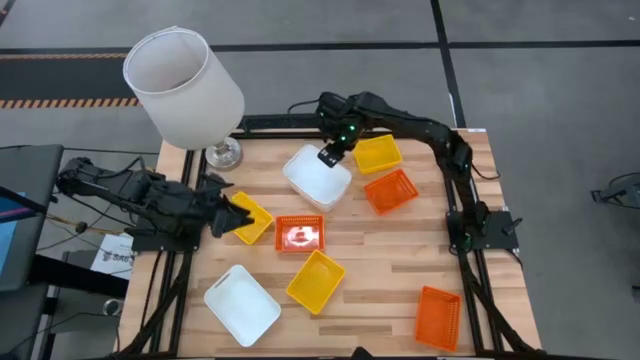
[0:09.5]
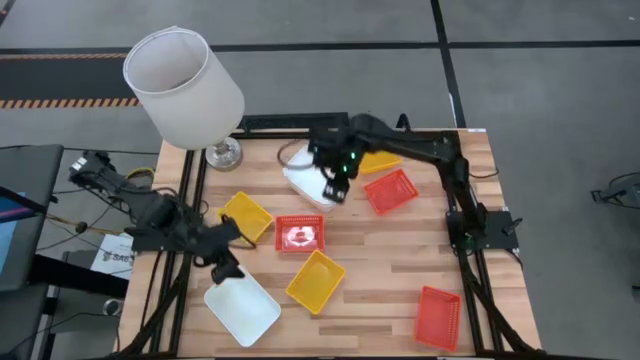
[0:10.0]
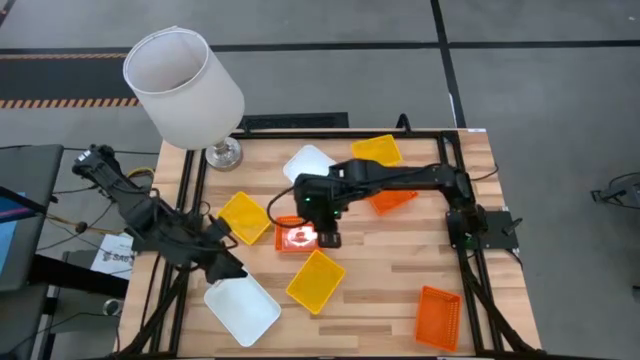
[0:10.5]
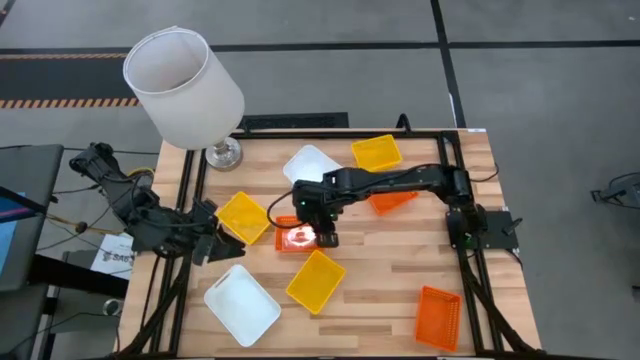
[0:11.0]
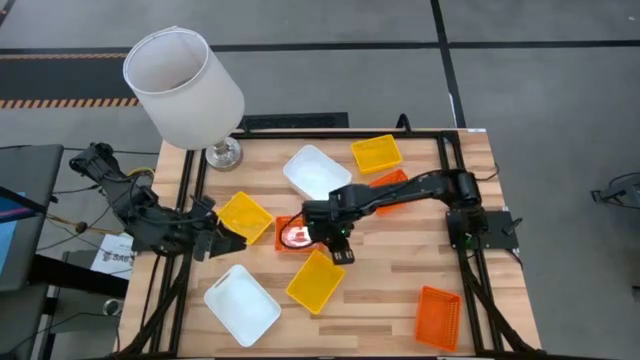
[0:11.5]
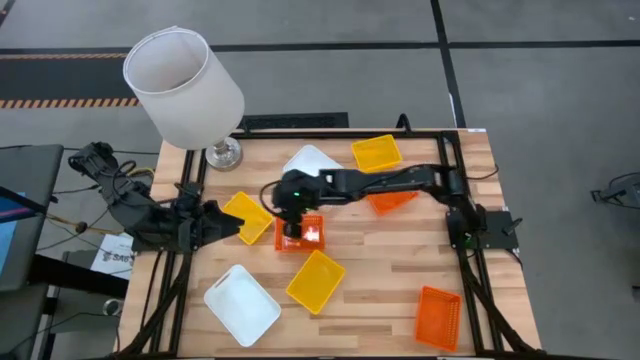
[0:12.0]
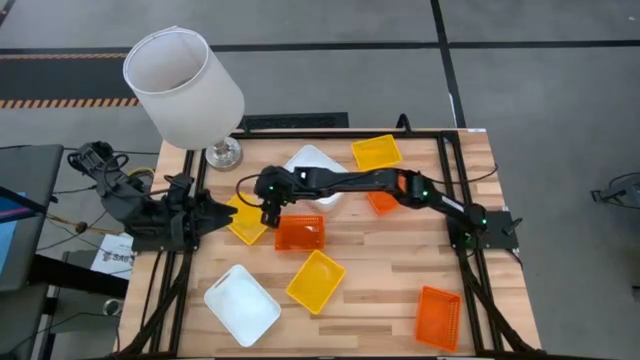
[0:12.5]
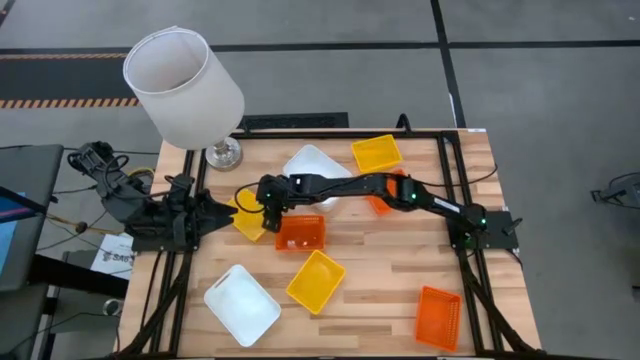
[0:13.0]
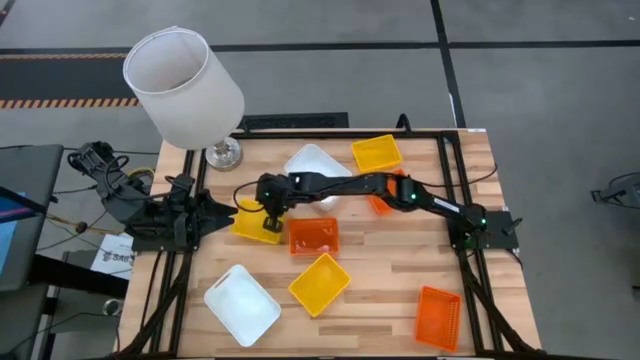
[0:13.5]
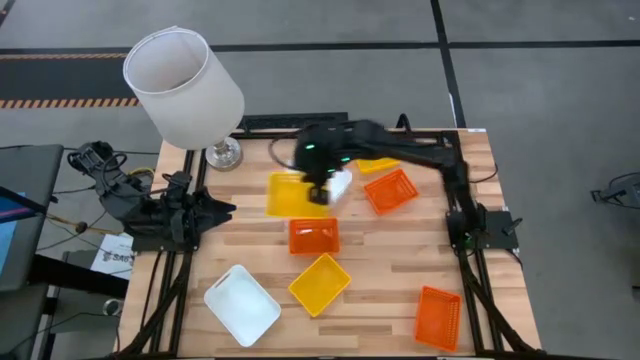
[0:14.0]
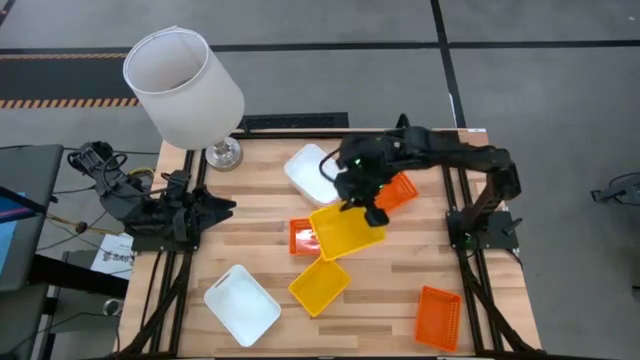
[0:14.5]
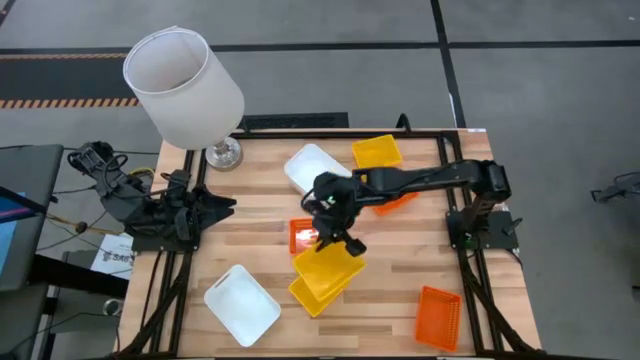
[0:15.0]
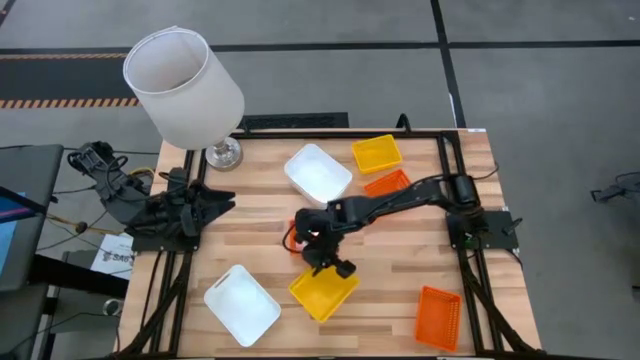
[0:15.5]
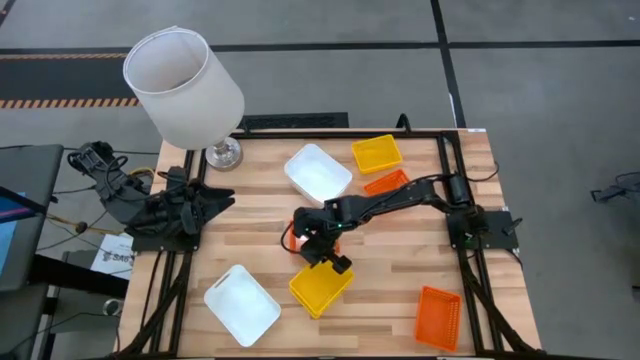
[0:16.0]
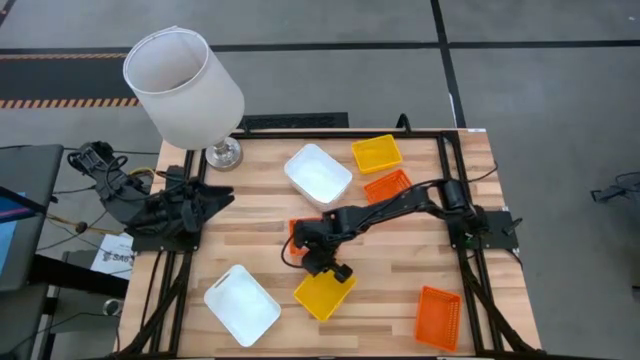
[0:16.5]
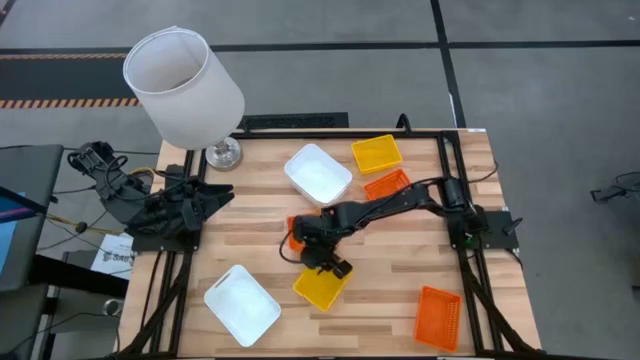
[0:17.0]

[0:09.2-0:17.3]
Stack the middle left yellow bin on the bottom yellow bin

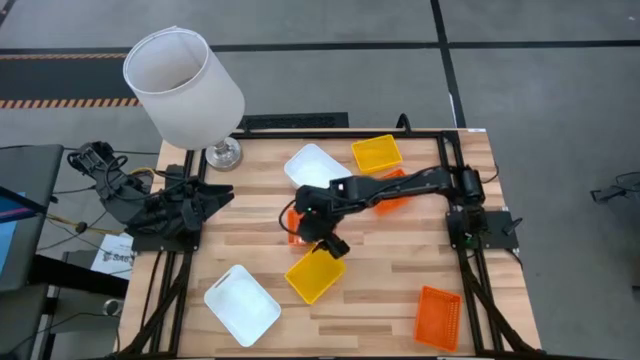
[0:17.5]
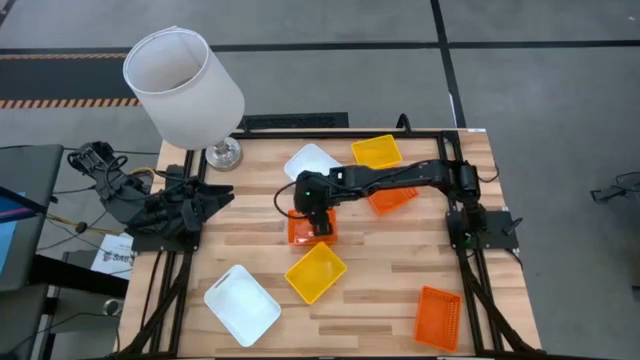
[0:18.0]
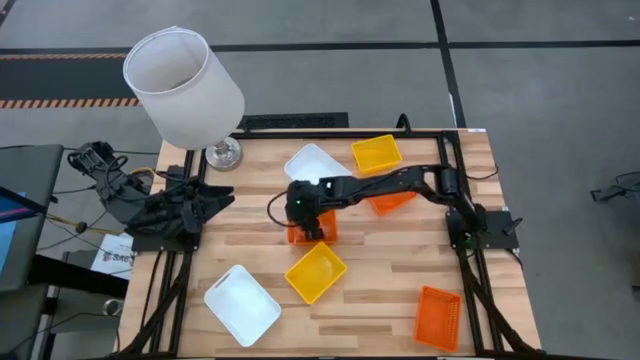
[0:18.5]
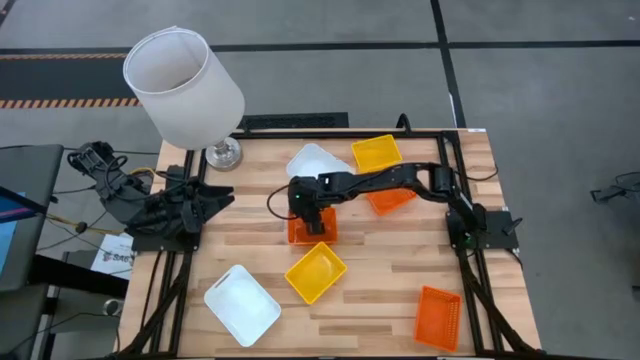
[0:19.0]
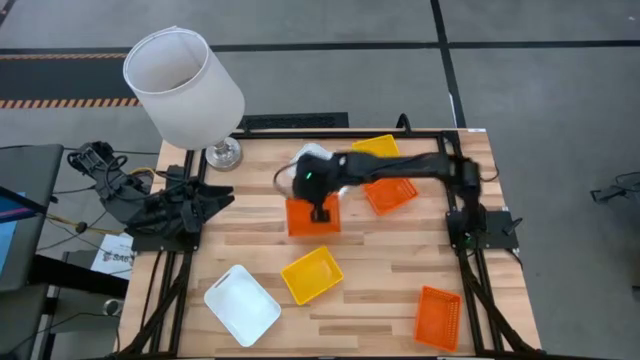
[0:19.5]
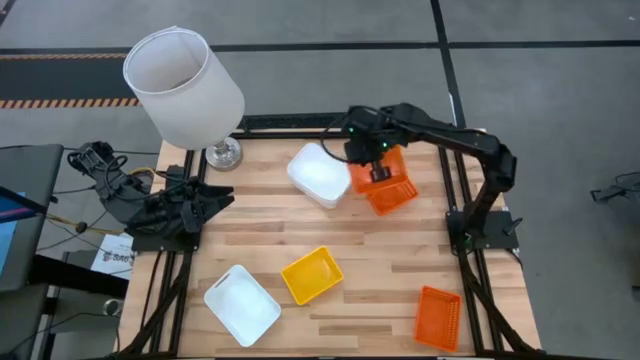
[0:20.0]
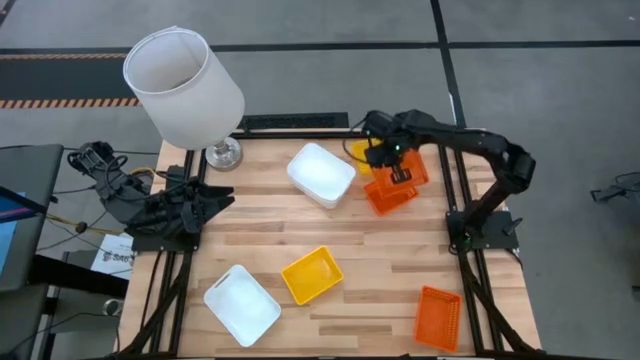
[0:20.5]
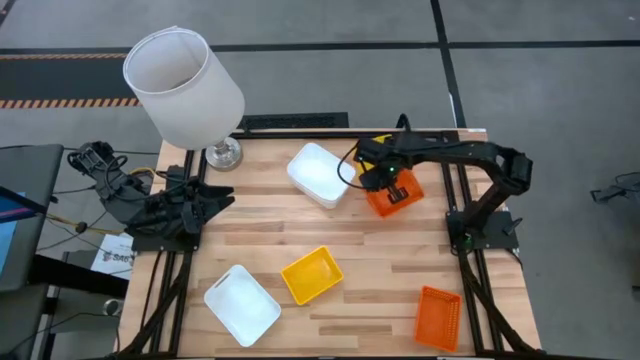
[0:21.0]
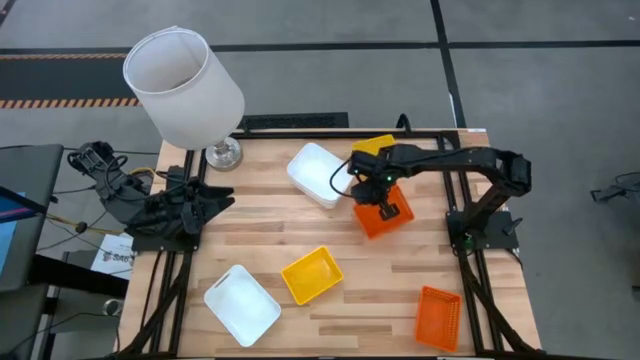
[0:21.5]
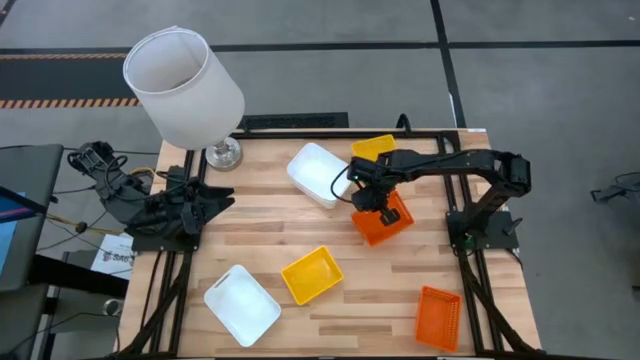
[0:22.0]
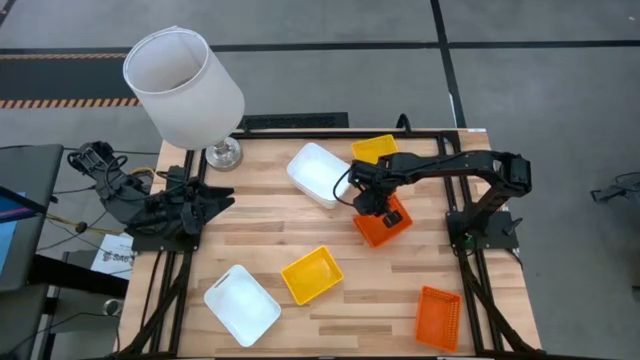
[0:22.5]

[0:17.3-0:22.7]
Stack the middle left orange bin on the top orange bin

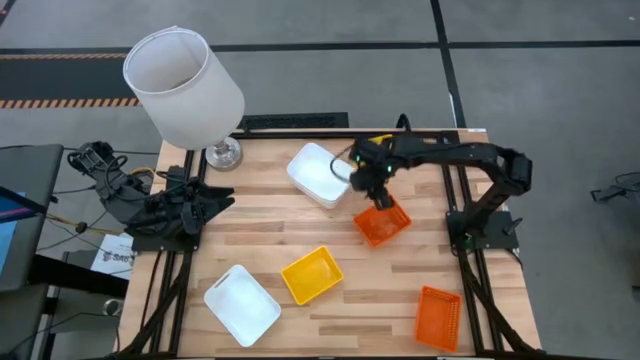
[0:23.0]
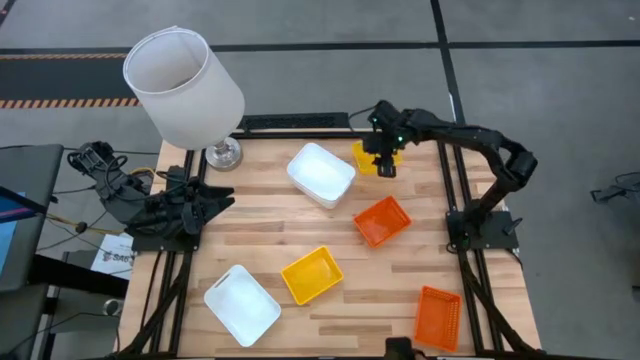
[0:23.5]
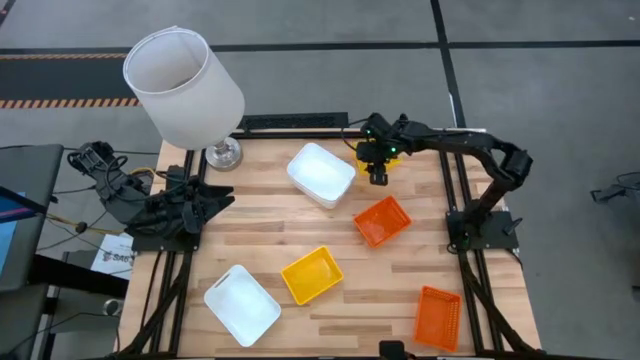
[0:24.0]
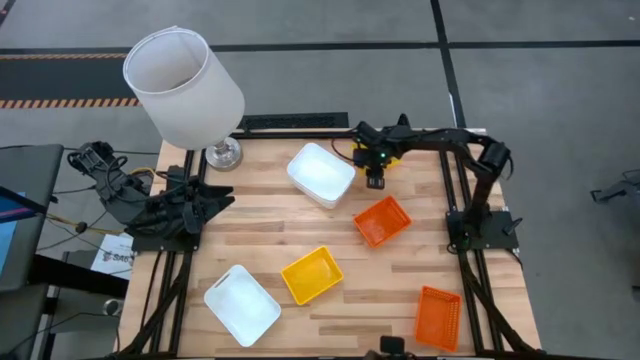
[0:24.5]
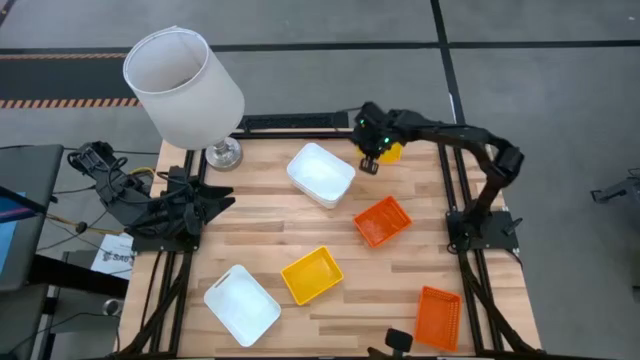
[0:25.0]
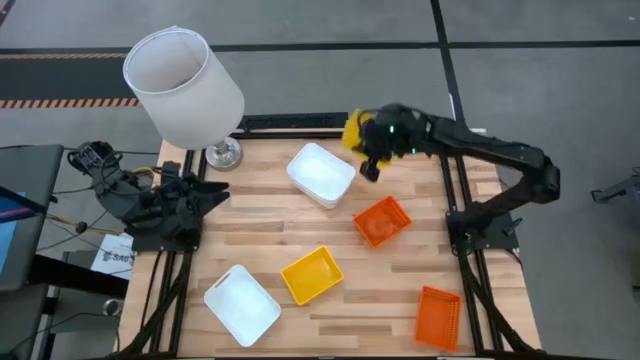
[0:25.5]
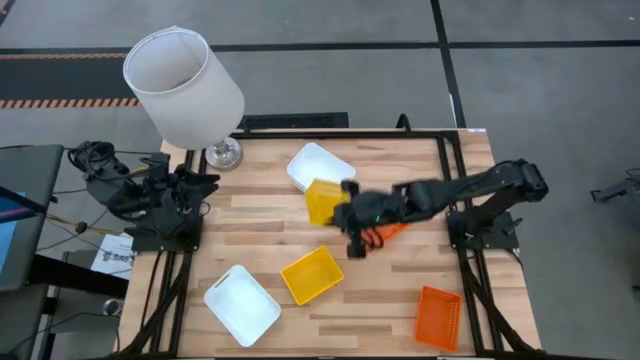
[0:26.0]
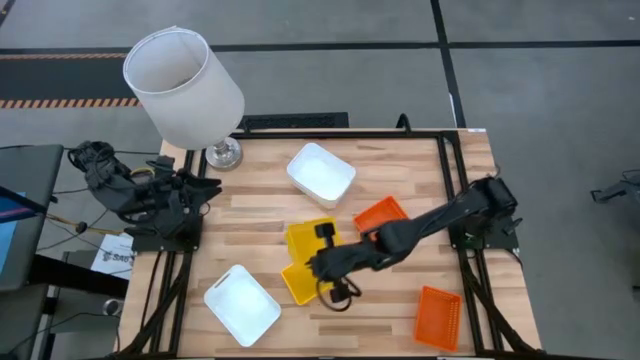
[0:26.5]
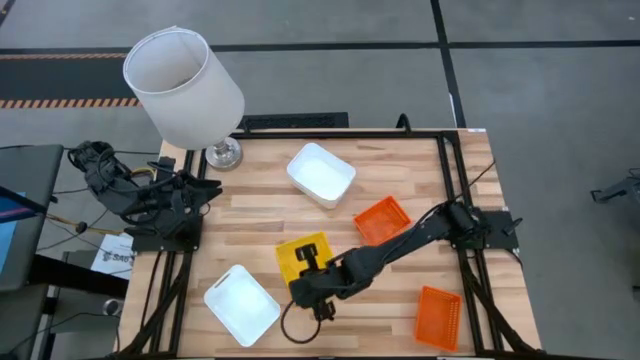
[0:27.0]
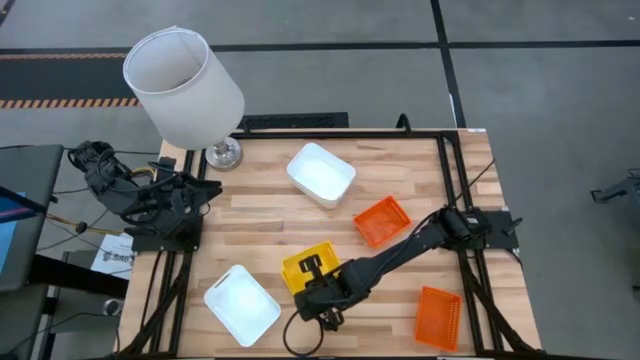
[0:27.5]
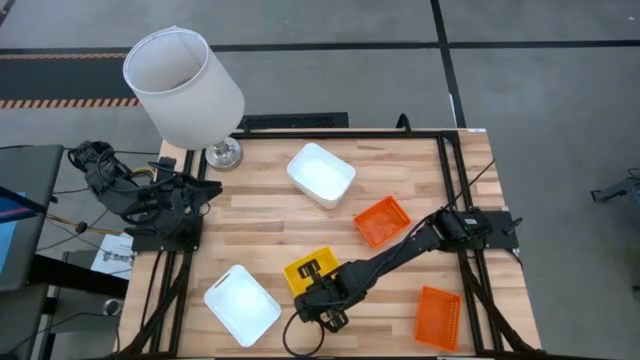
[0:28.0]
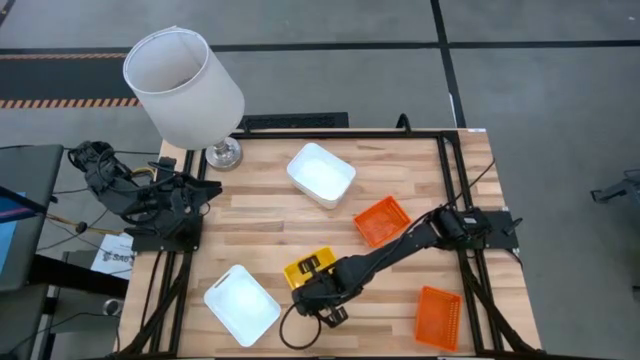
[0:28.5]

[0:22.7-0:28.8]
Stack the top yellow bin on the bottom yellow bins

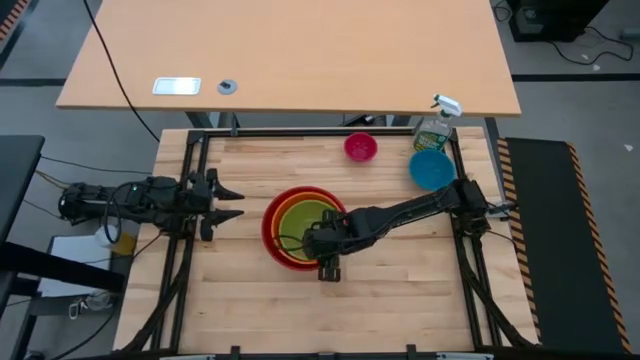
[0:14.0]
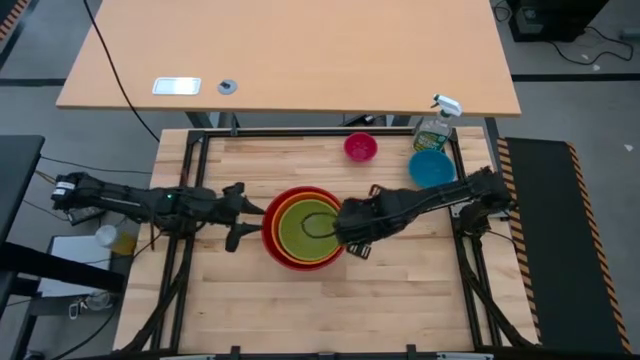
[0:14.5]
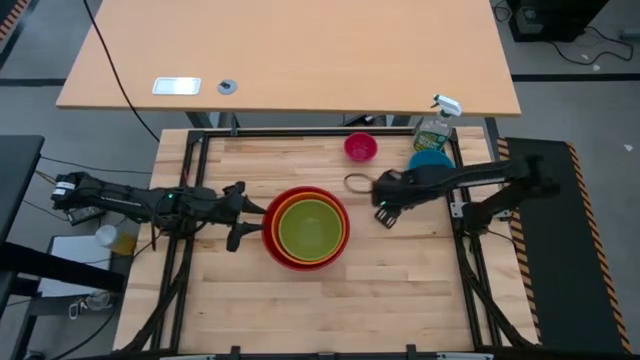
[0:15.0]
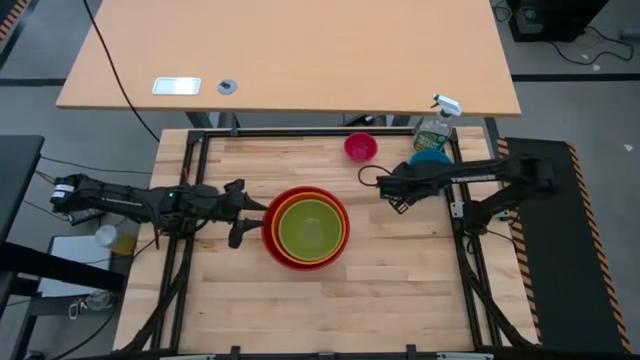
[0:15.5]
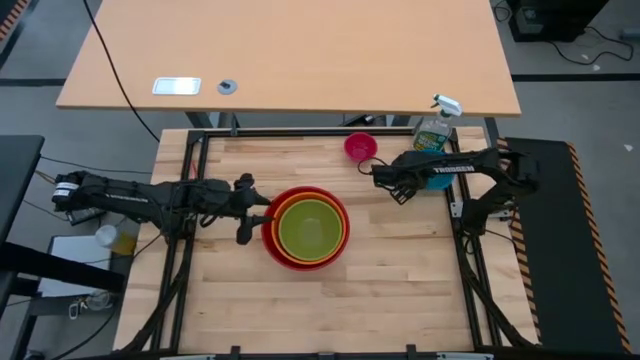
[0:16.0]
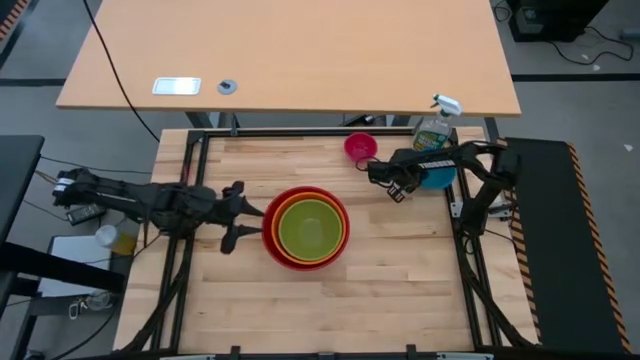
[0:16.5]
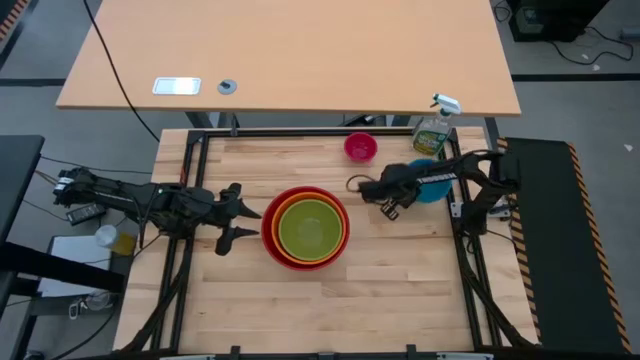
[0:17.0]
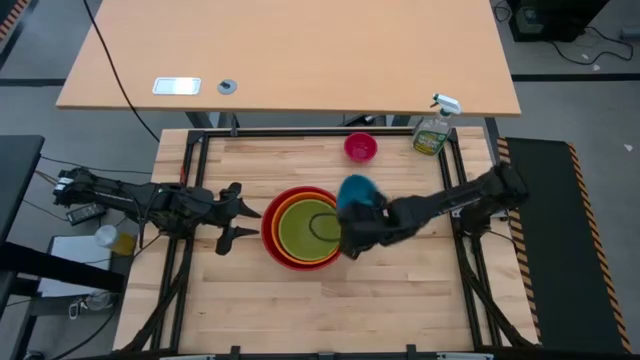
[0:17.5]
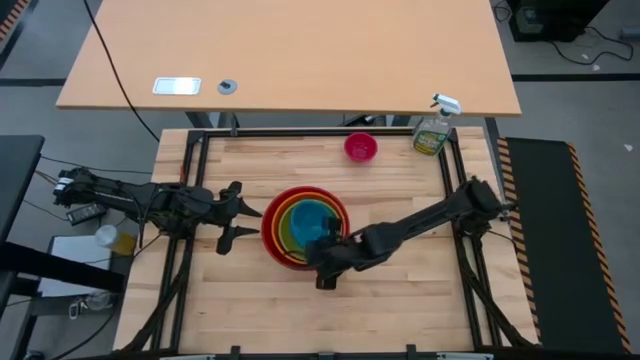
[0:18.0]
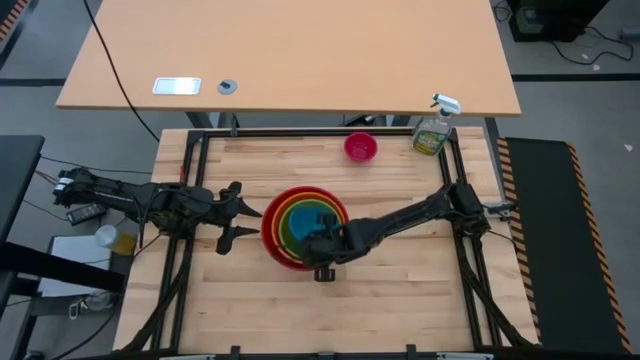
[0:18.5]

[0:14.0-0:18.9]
Stack the blue bowl on top of the green bowl
